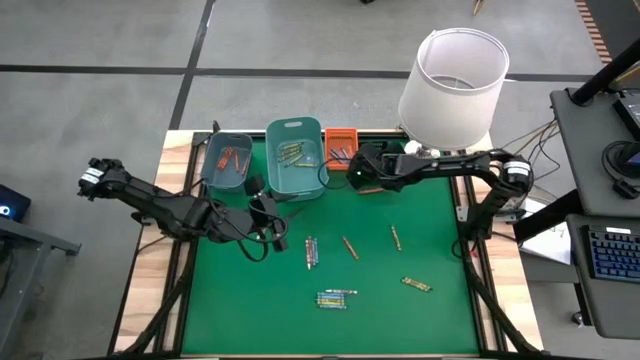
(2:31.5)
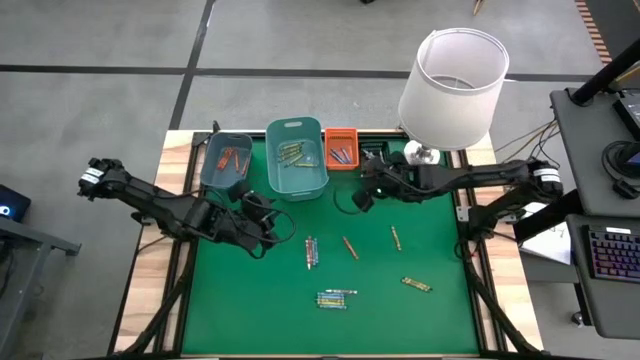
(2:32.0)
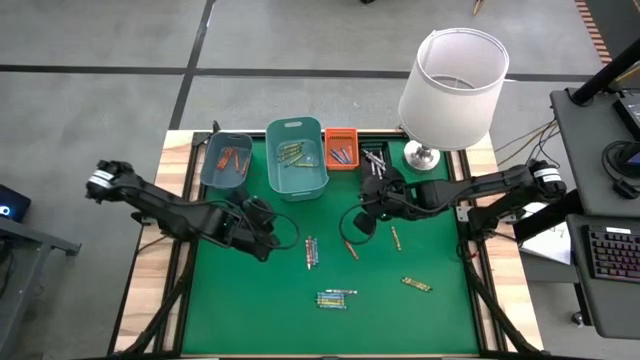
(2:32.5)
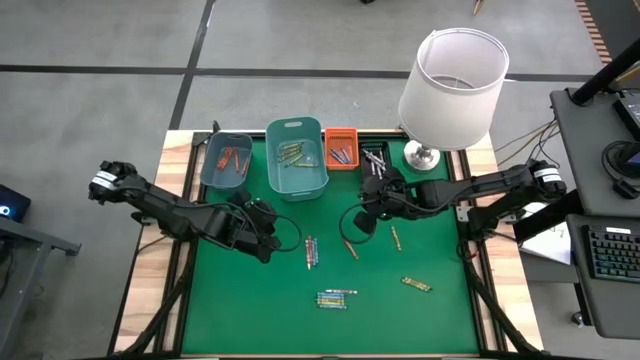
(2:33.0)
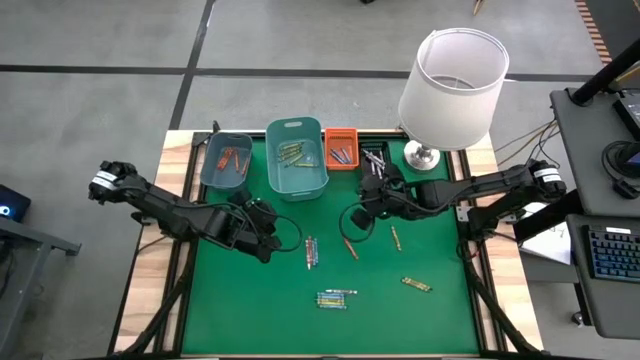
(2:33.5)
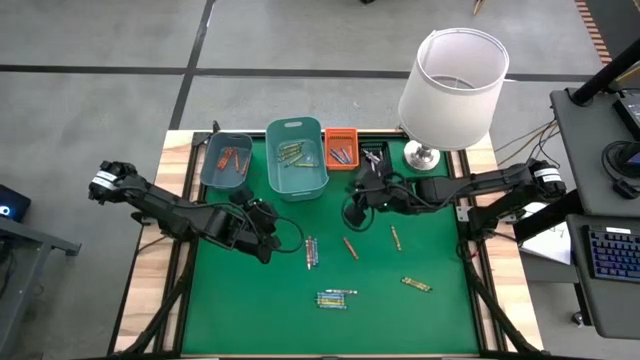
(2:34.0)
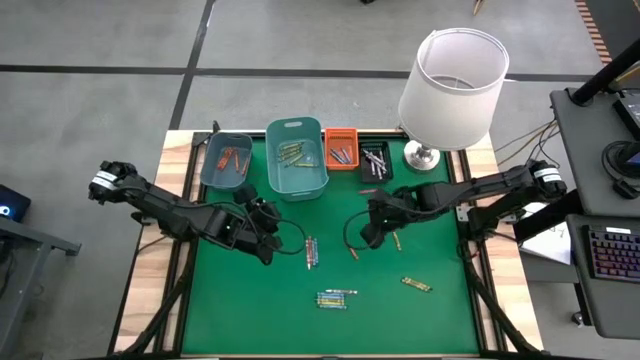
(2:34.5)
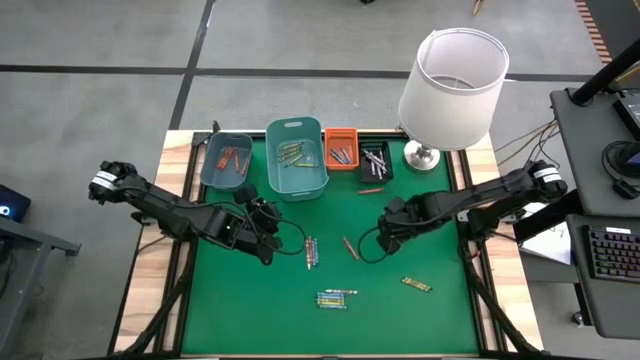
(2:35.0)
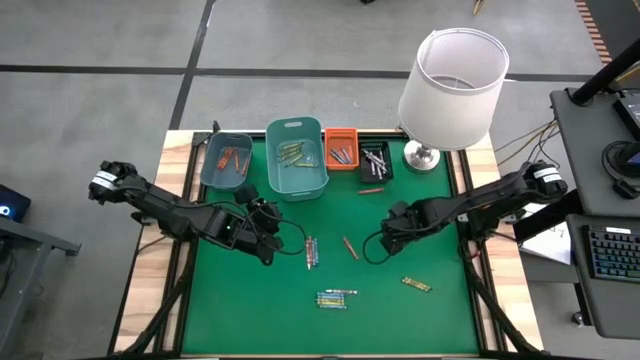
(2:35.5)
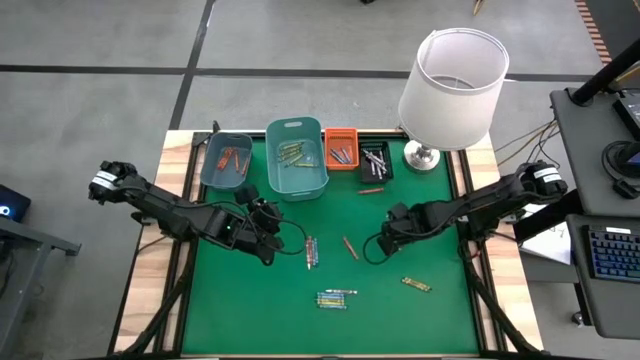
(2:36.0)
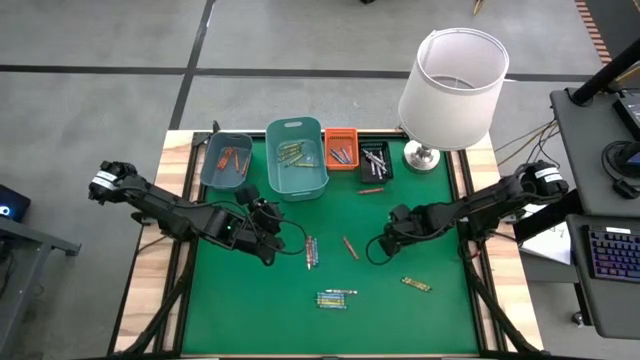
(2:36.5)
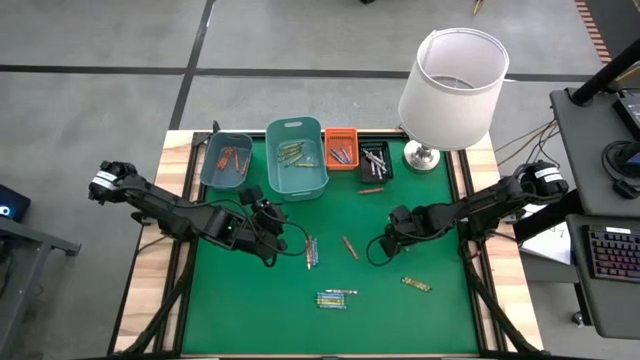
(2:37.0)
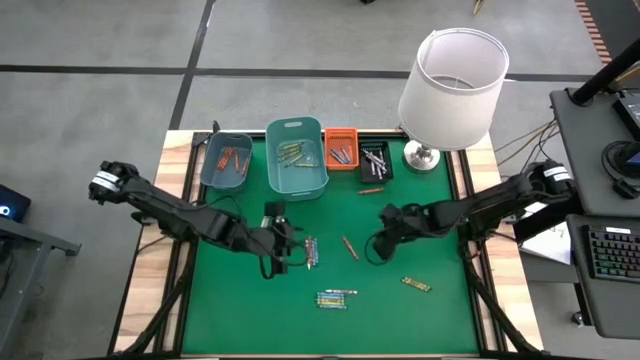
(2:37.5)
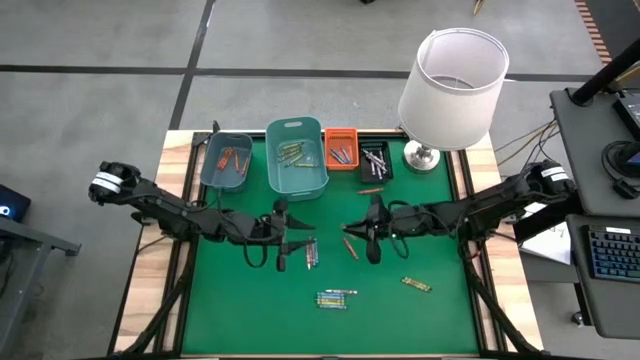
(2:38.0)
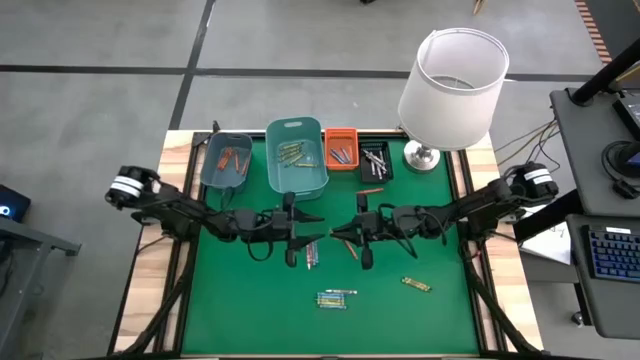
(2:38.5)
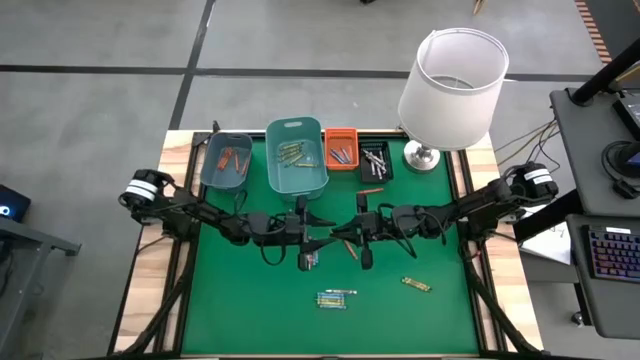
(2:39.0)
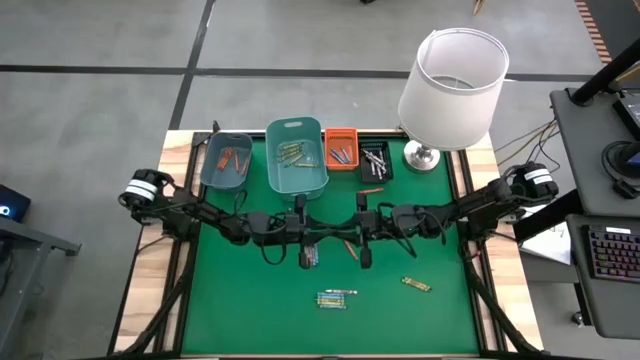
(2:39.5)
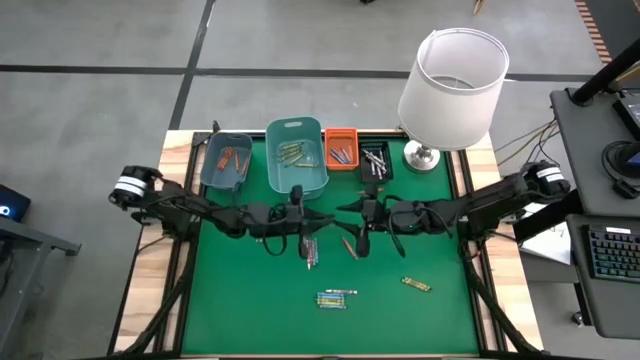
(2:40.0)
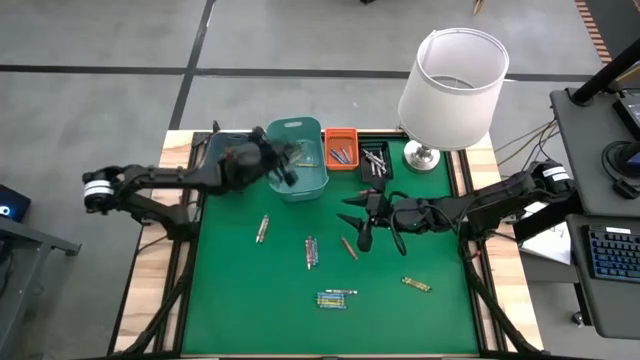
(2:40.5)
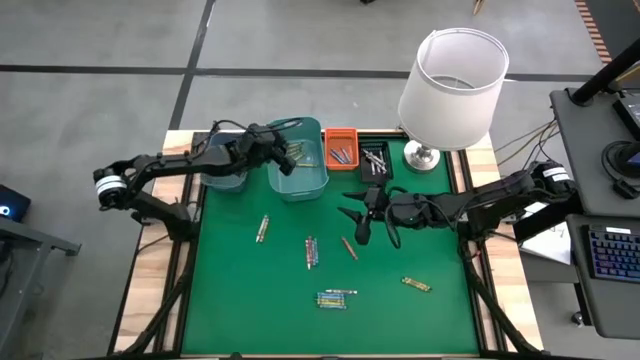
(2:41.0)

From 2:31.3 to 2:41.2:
Task: Sort crayons
Put the green crayon into the green bin

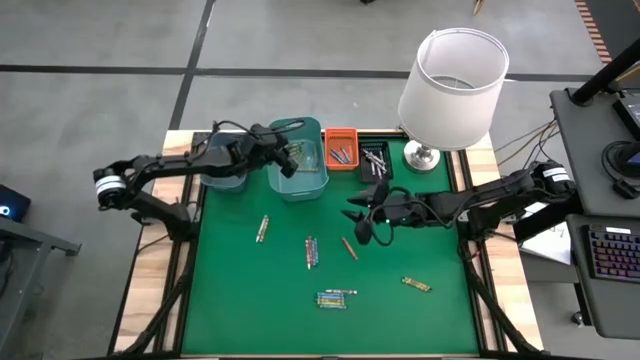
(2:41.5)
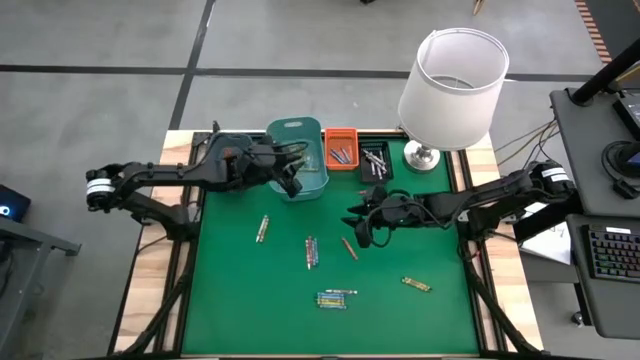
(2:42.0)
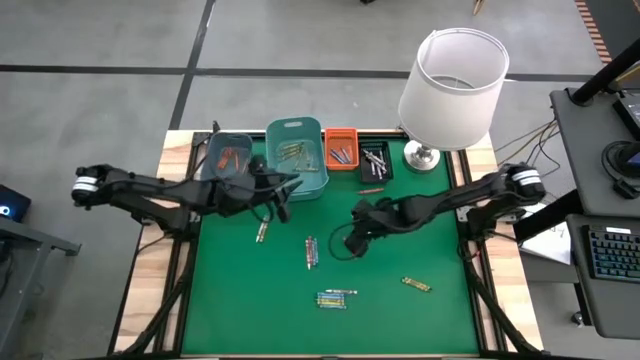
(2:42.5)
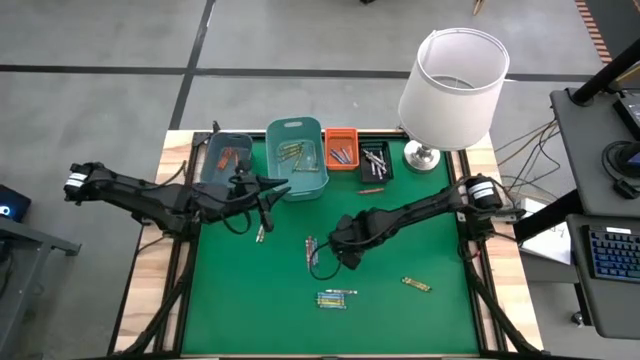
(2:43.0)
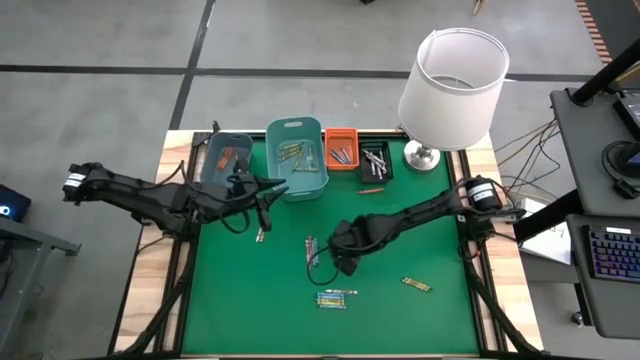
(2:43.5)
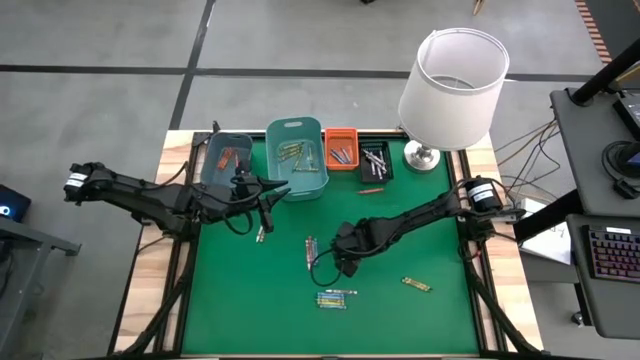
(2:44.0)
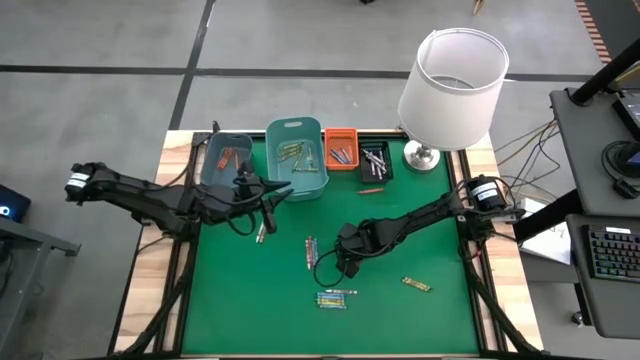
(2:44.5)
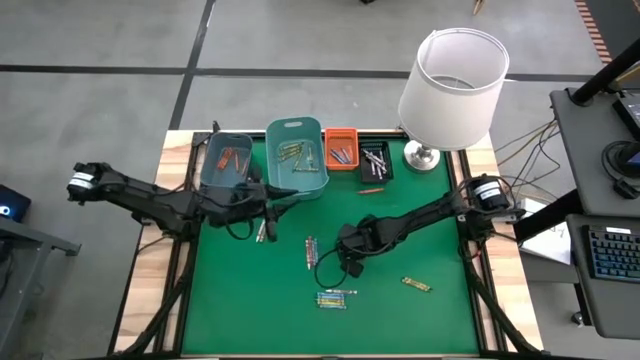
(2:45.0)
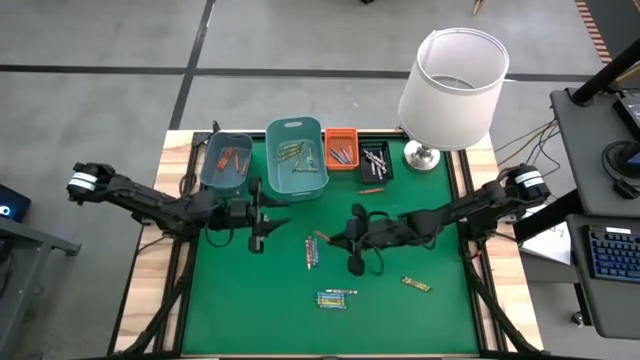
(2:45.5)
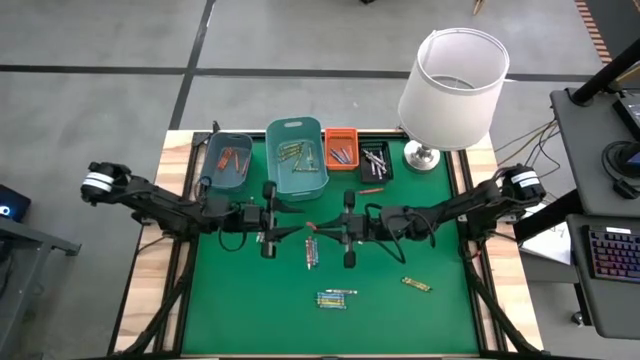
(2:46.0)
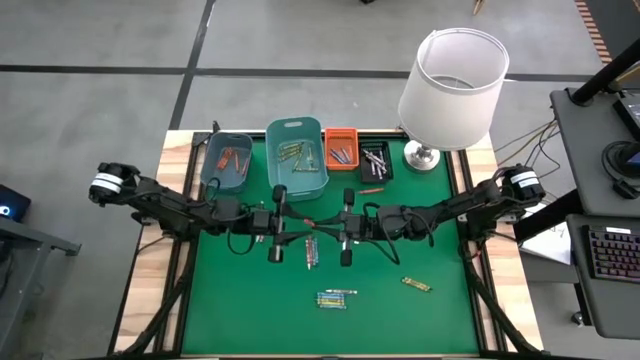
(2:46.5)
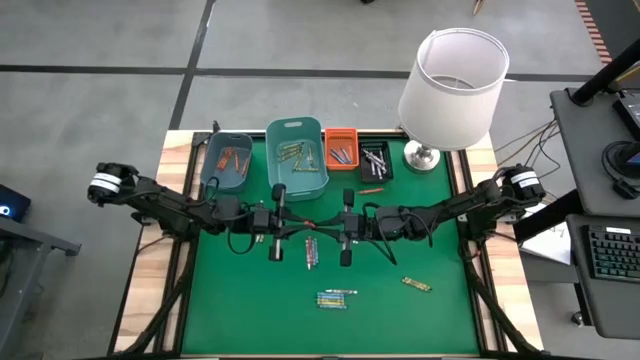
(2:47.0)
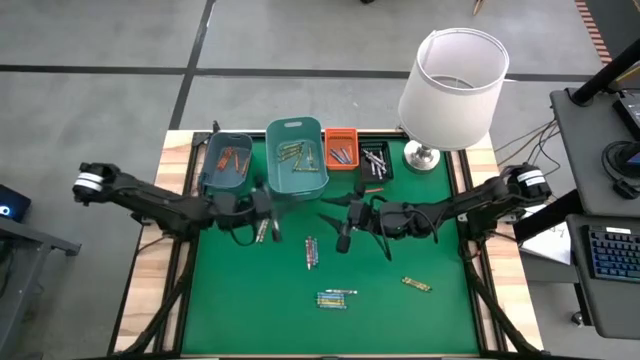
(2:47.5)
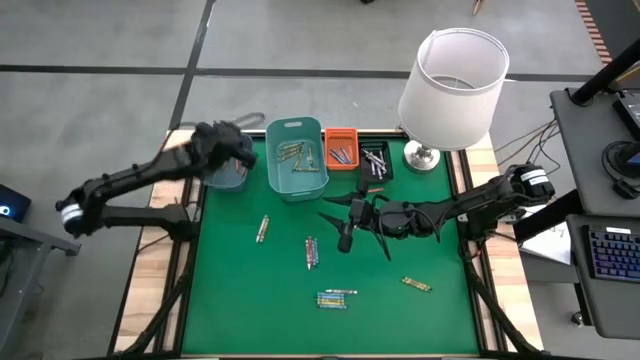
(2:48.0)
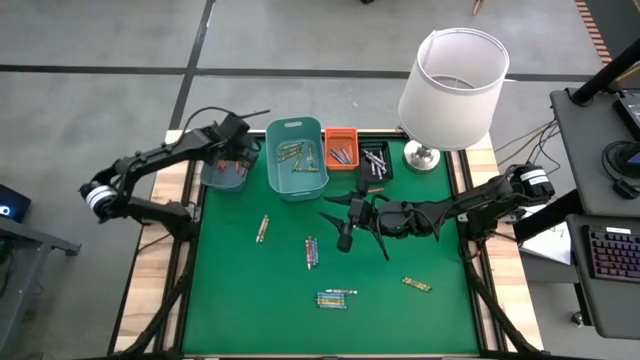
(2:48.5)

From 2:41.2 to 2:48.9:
Put the orange crayon into the blue bin

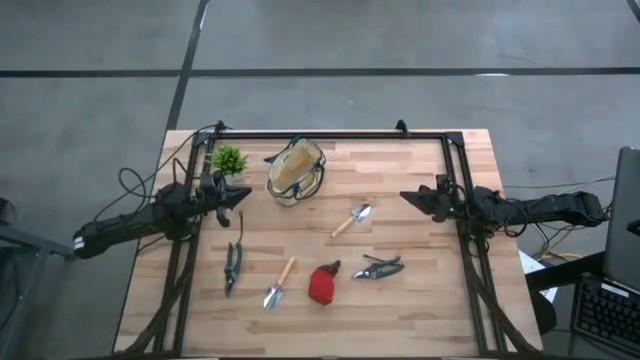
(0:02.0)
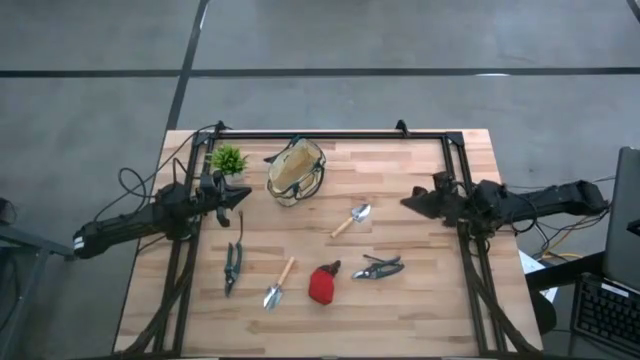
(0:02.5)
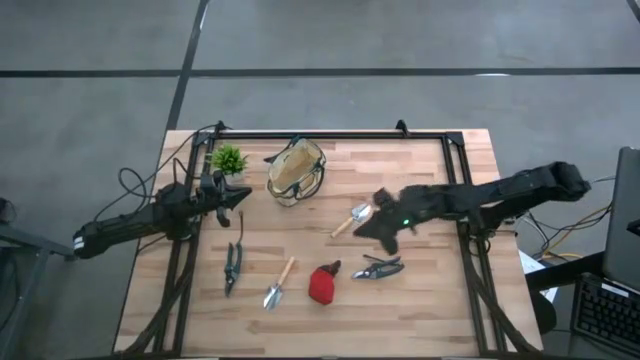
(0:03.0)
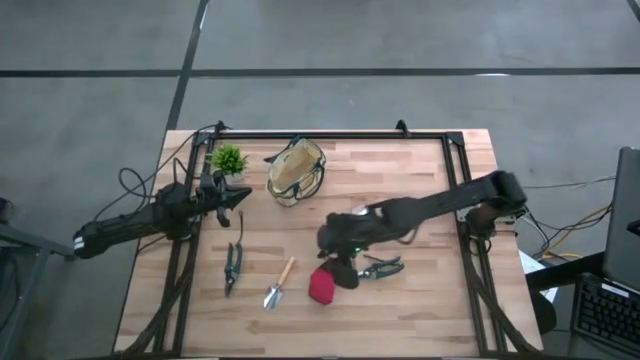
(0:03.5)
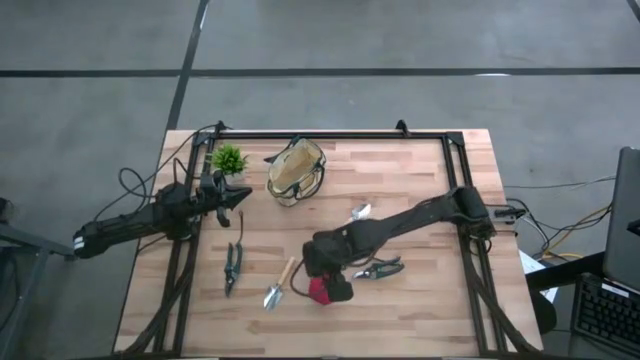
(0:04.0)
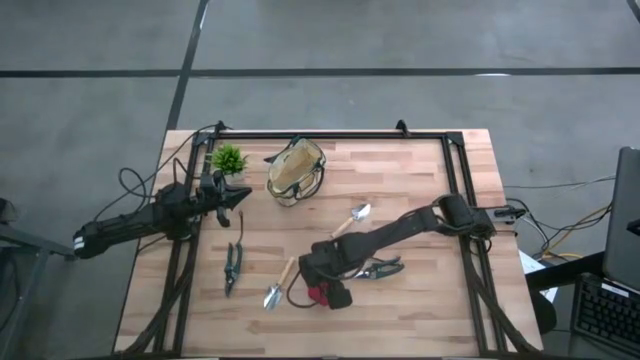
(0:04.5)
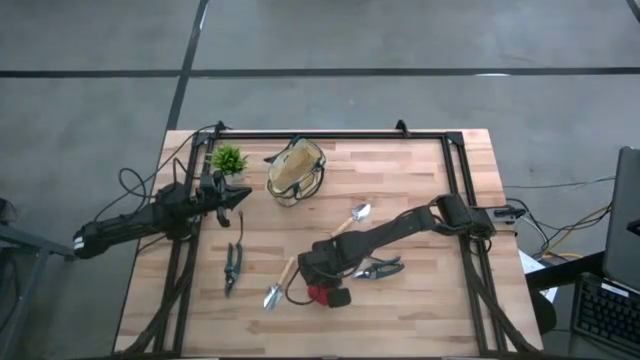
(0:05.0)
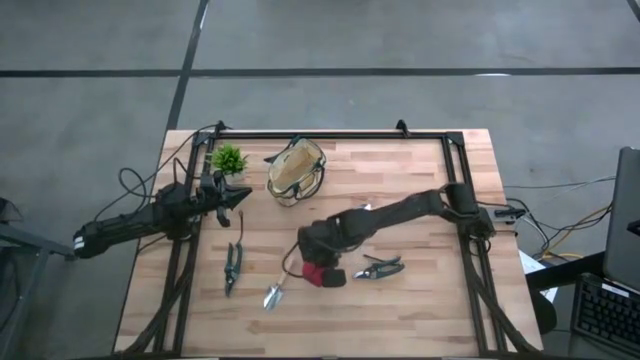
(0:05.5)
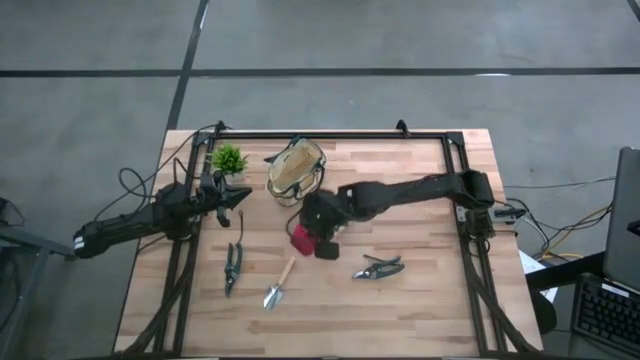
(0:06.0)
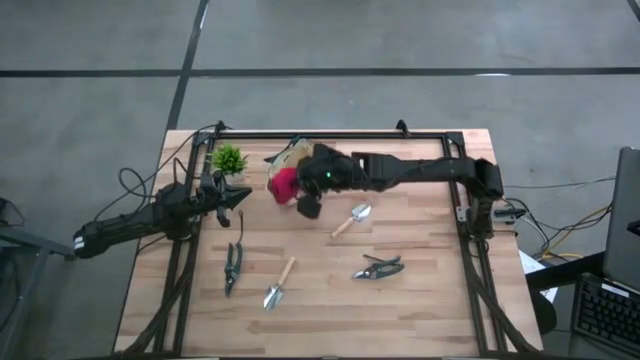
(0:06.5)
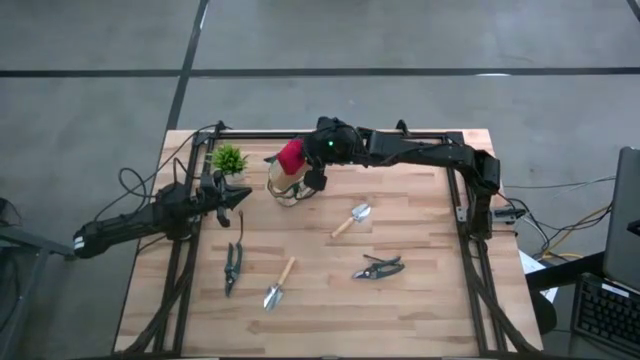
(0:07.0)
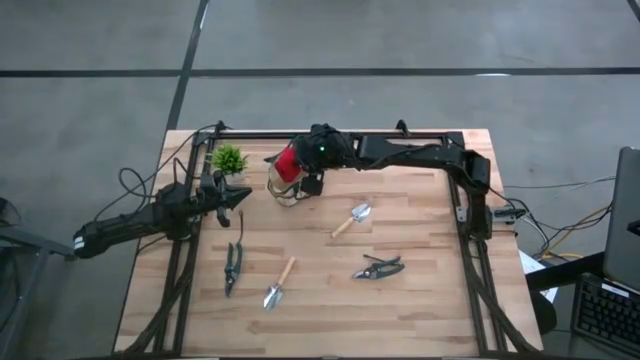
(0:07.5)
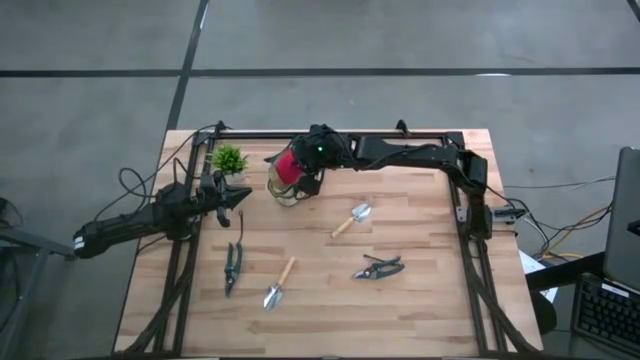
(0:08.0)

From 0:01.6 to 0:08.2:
Task: Pick & Place Garden tools in Gardening bag
Put the red red glove into the green gardening bag
